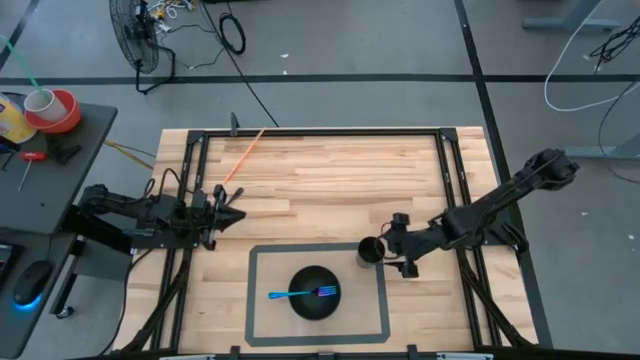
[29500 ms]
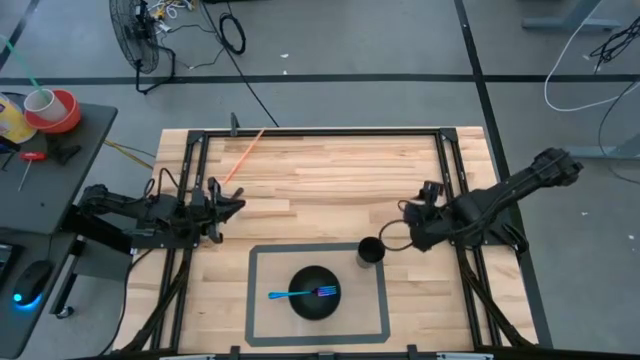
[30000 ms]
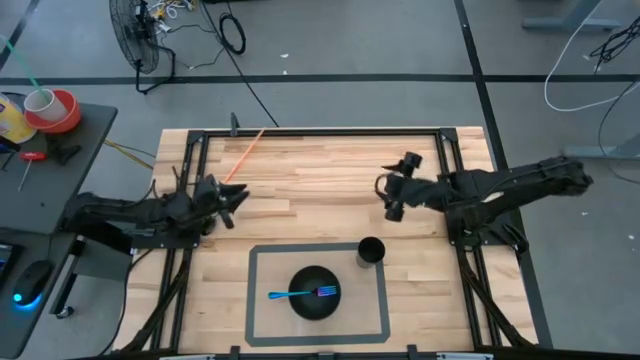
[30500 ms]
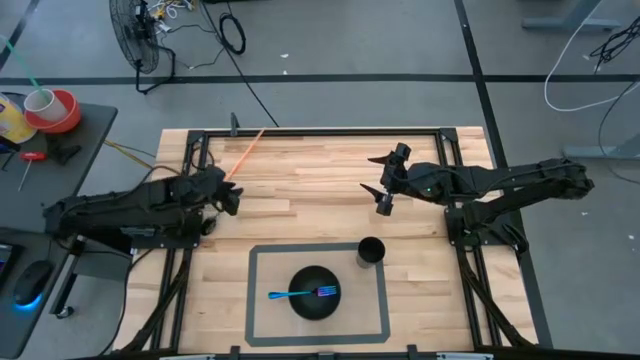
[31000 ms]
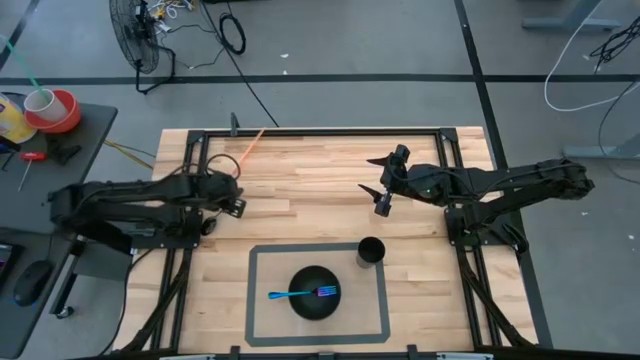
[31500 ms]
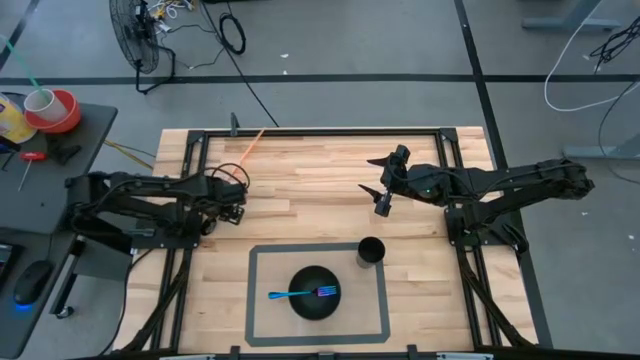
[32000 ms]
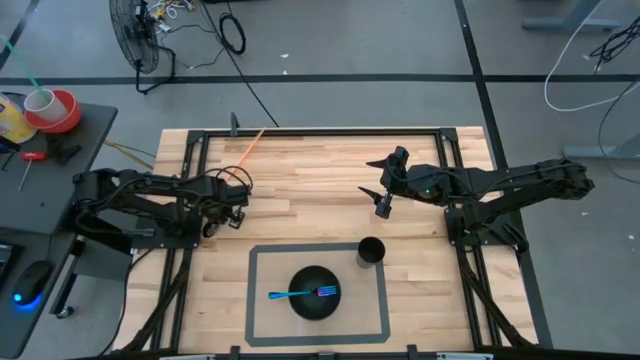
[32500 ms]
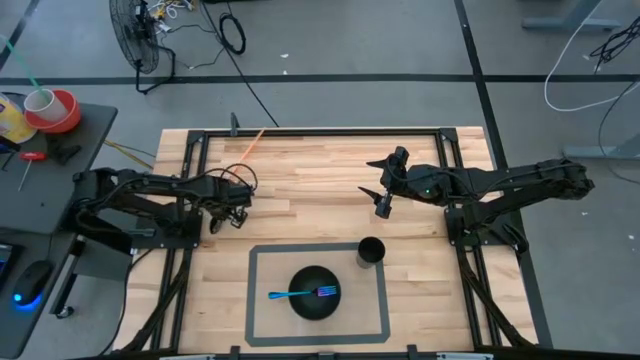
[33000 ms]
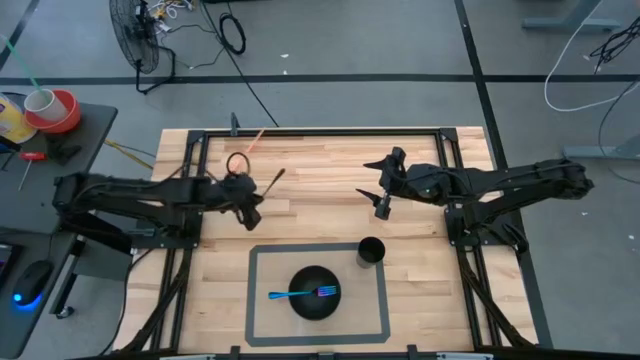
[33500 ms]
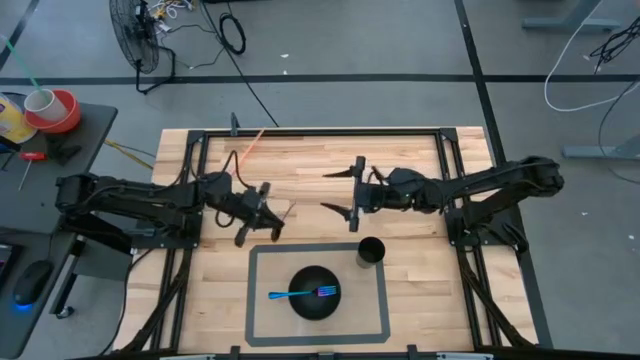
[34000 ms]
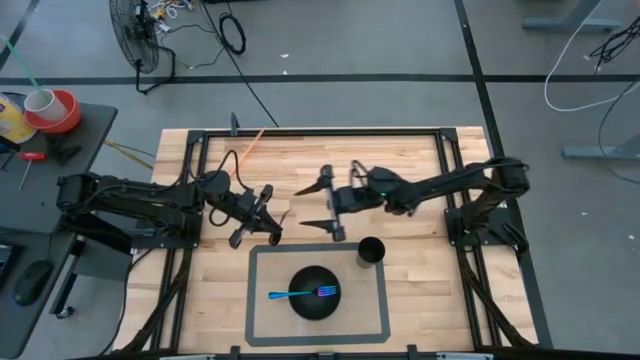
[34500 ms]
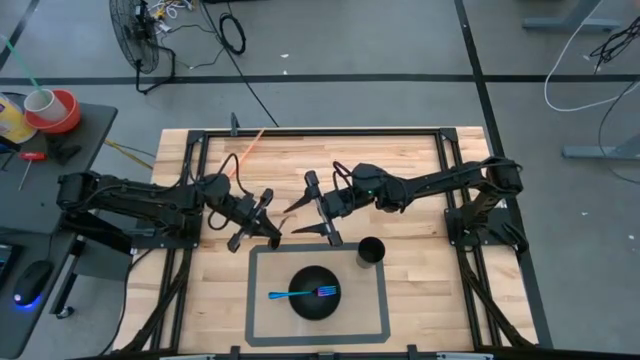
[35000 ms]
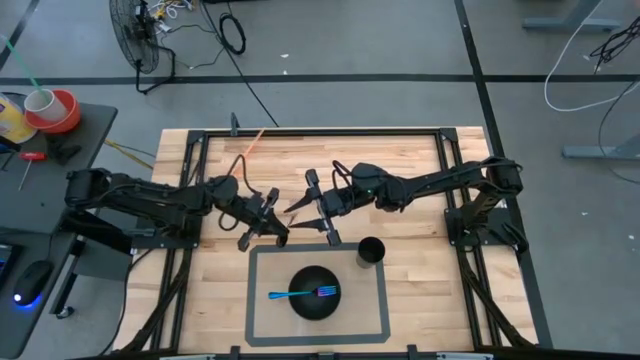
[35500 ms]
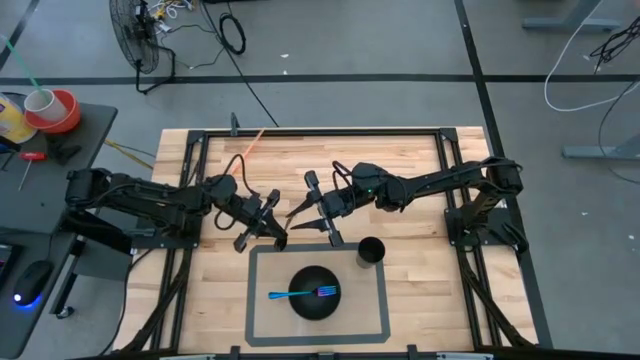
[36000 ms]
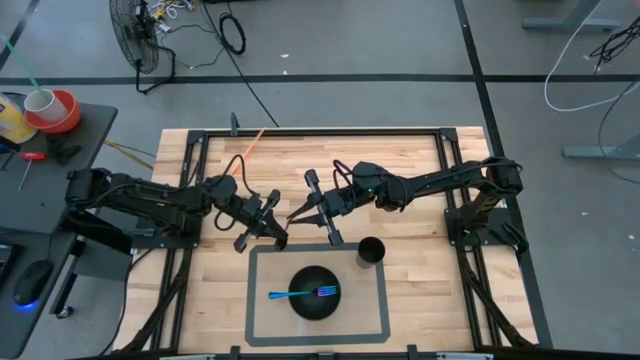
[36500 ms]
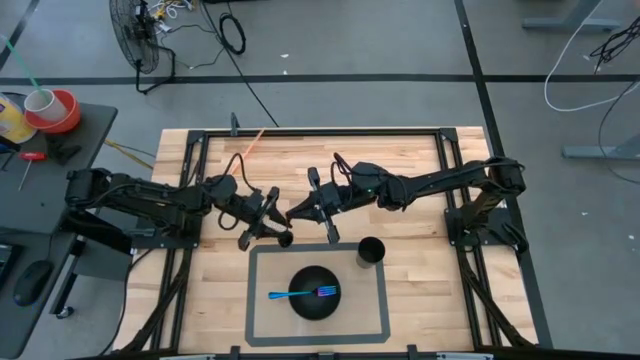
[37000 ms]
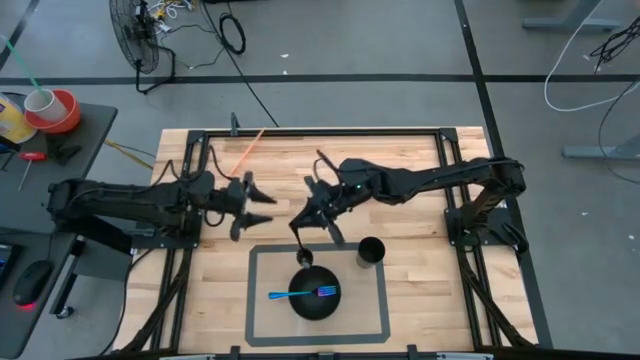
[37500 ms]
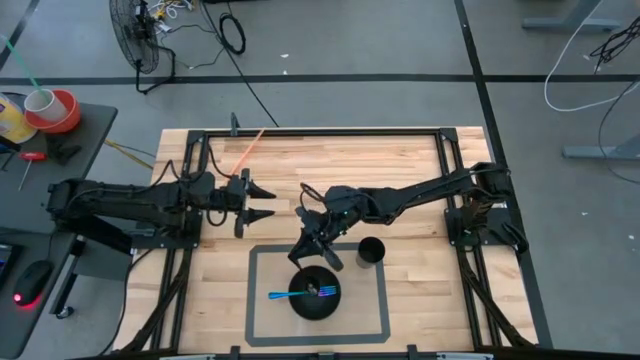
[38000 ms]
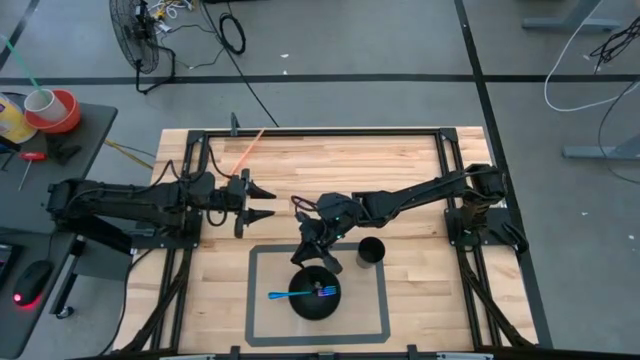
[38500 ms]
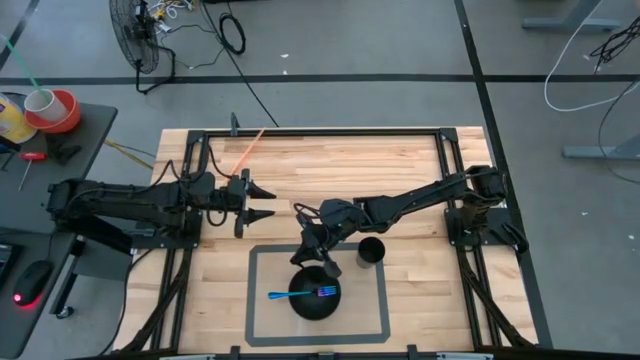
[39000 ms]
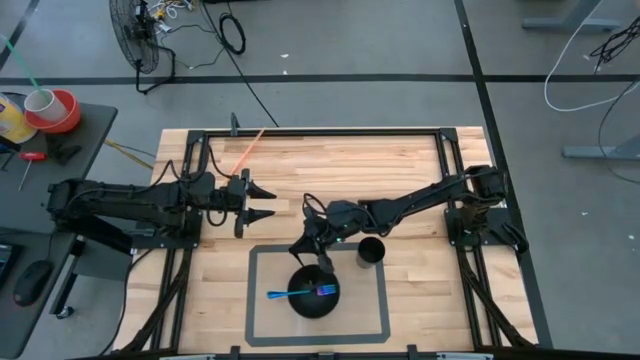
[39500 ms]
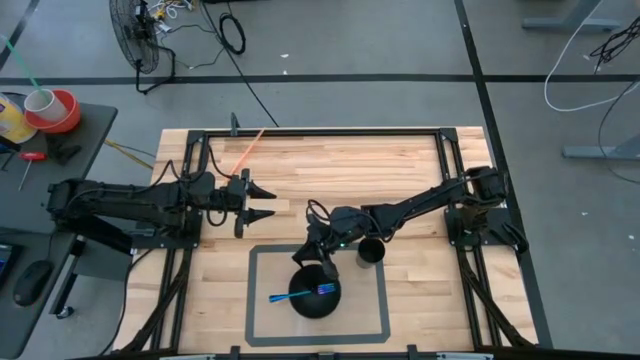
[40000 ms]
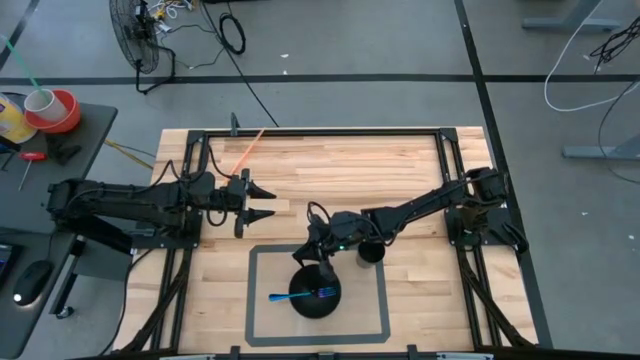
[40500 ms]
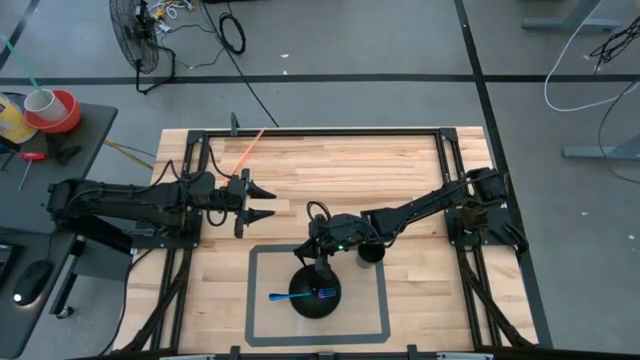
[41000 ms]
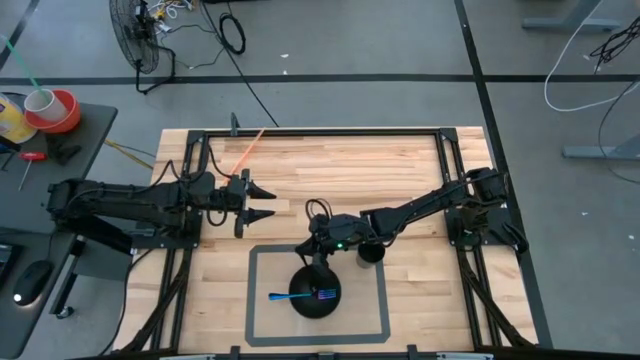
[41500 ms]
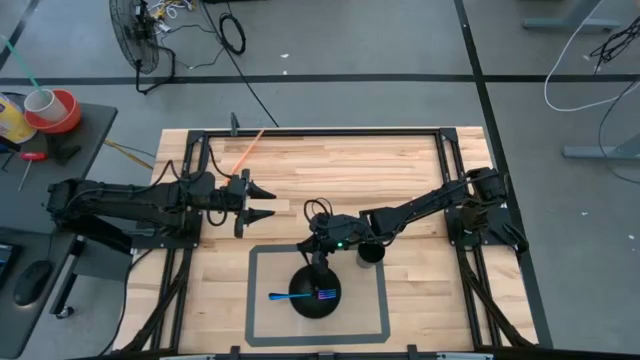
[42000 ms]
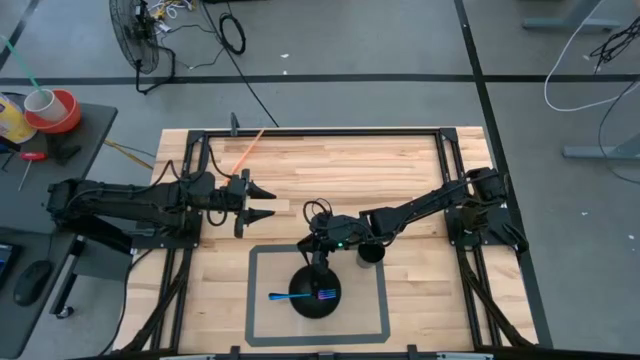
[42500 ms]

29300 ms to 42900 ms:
Task: Pick & Place Utensil
Put the black spoon into the black bowl on the transparent mat

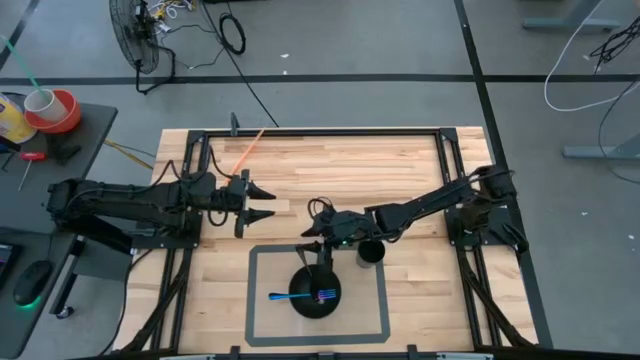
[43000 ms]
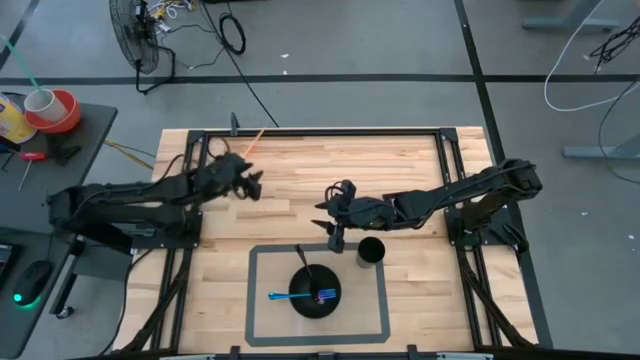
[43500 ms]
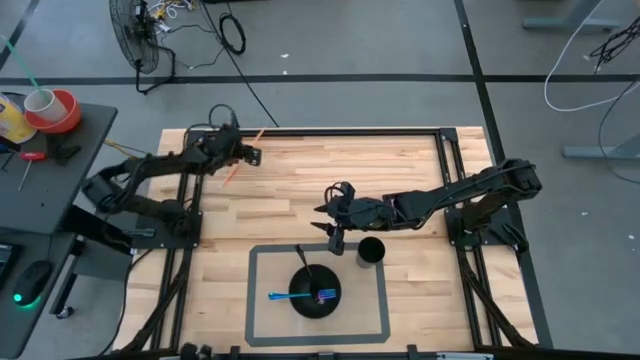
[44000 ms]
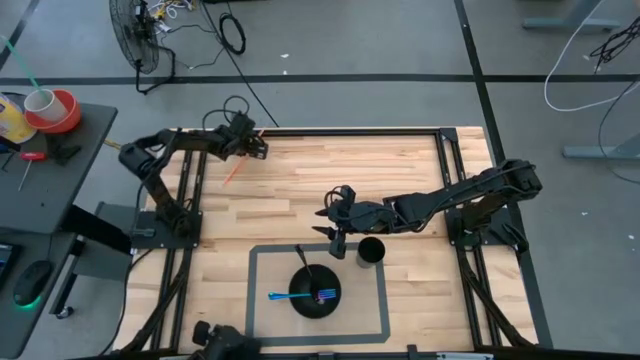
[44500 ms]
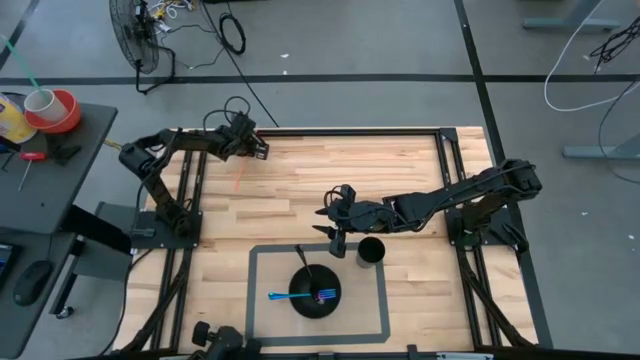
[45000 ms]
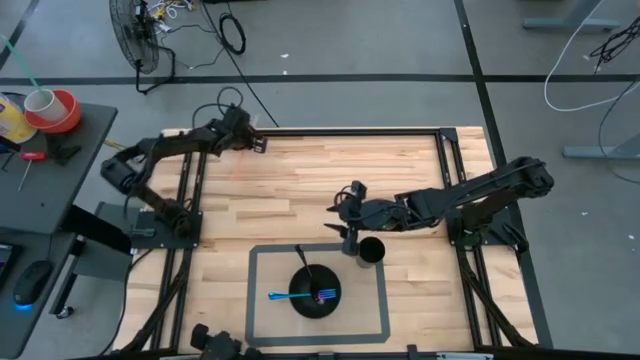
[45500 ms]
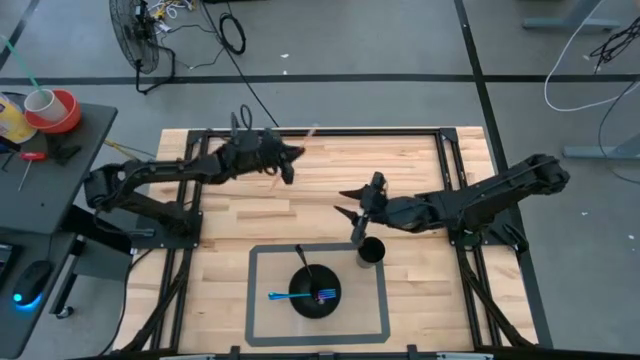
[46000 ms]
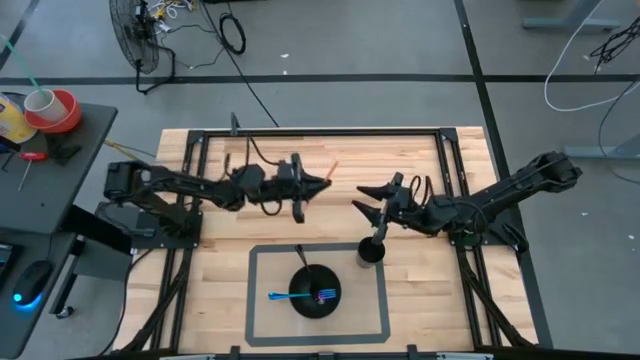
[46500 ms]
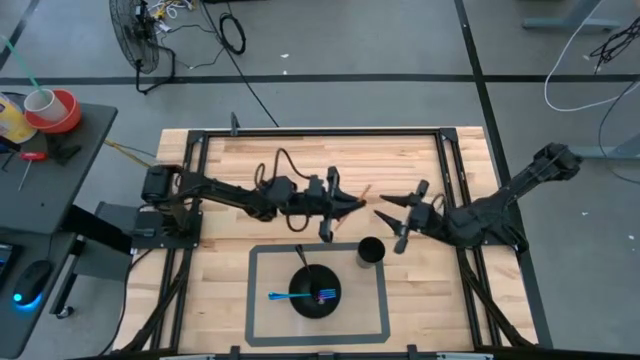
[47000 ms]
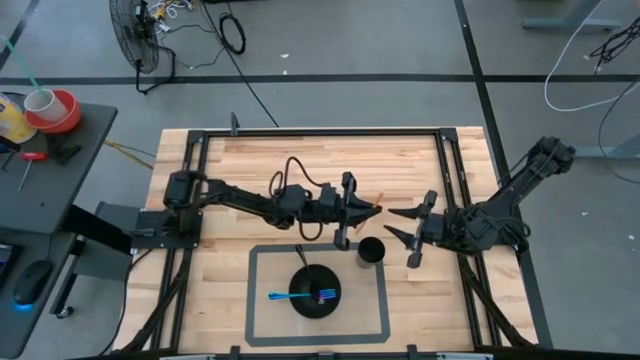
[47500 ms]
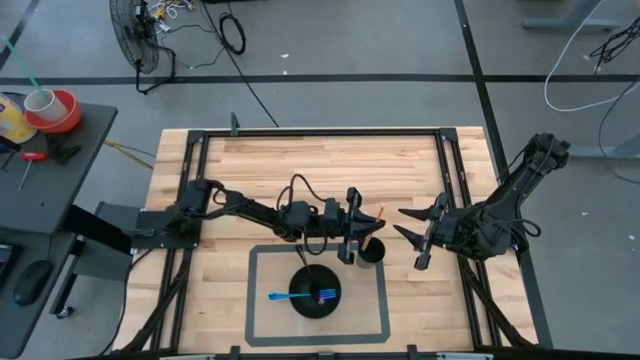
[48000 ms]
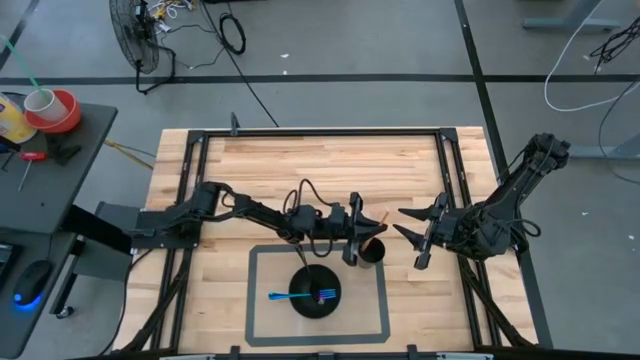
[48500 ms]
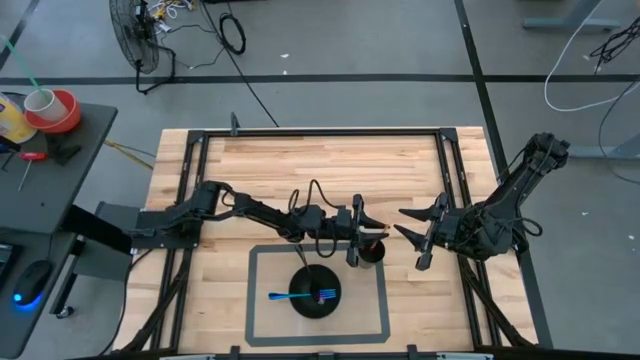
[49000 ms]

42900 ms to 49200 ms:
Put the orange straw into the black cup on the transparent mat

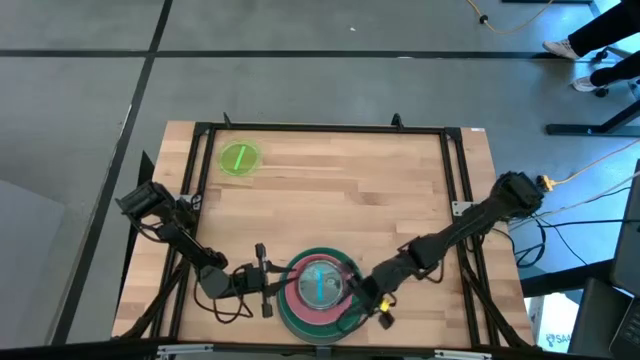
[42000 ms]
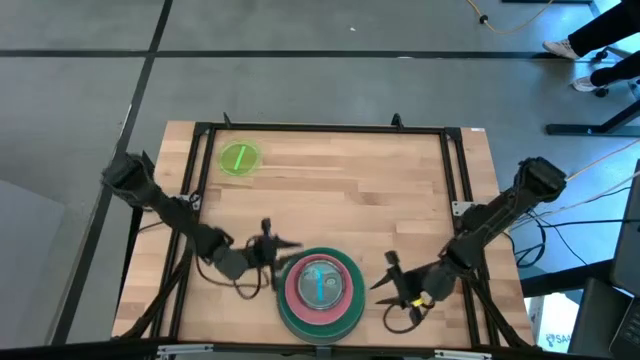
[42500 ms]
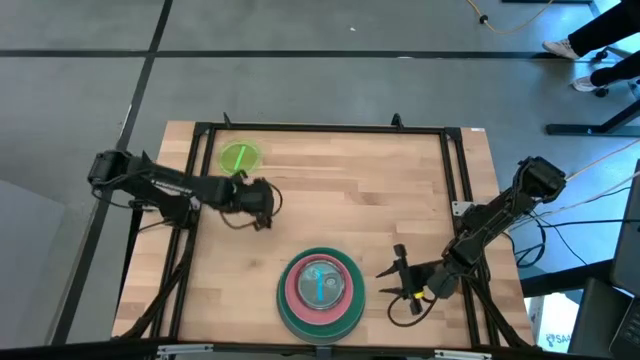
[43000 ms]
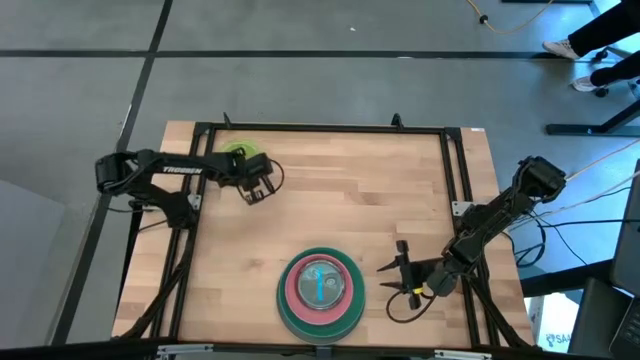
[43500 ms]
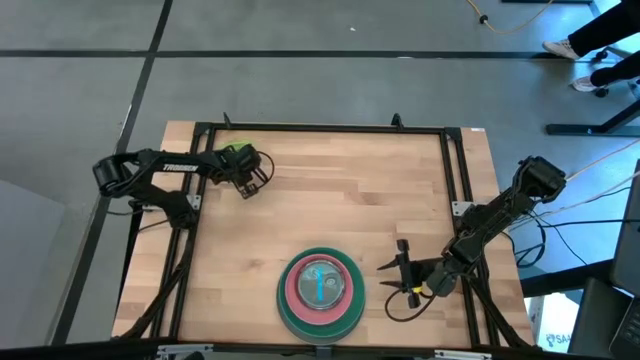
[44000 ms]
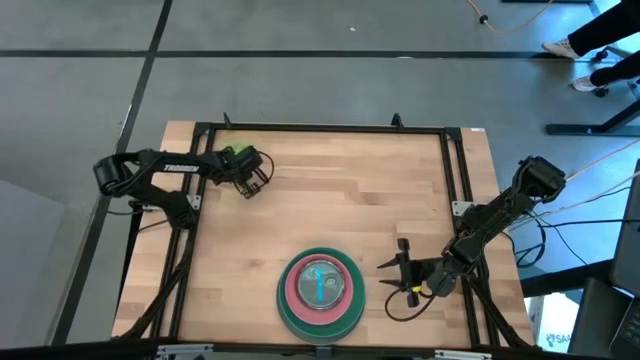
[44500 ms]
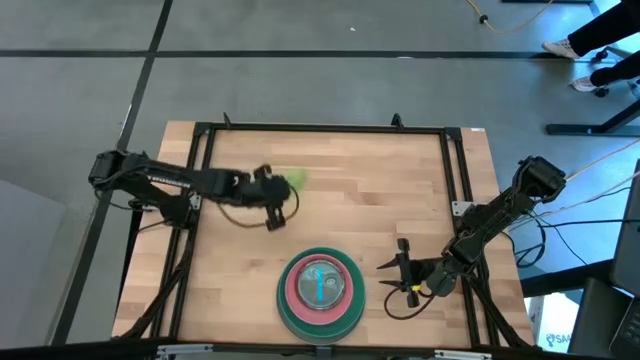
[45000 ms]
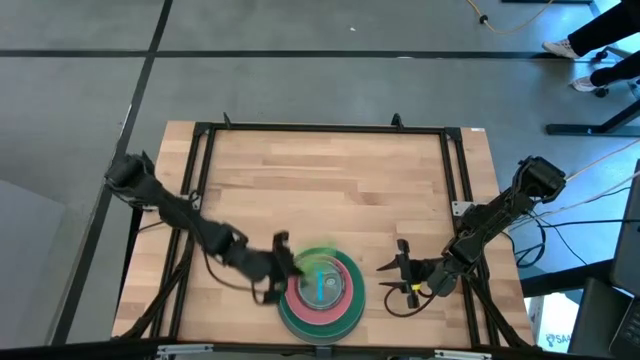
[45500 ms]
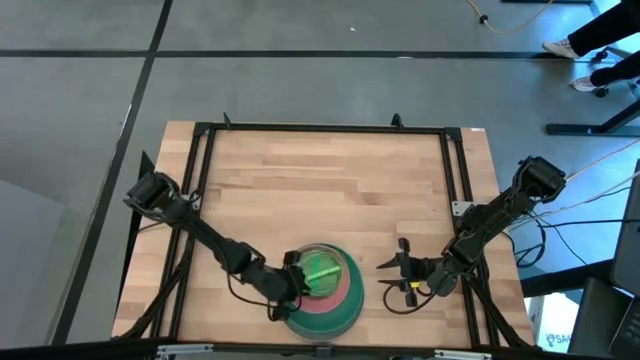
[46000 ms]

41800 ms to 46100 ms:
Task: Stack plastic plates
Stack the light green plate on top of the light blue plate
